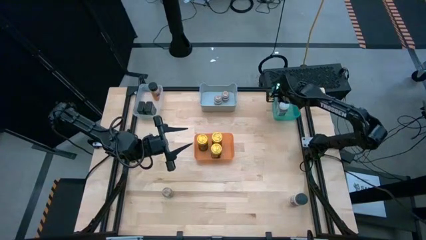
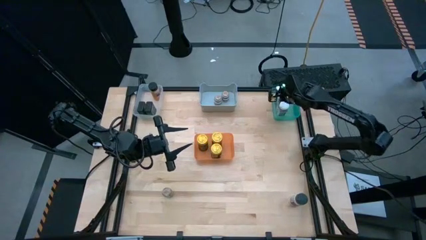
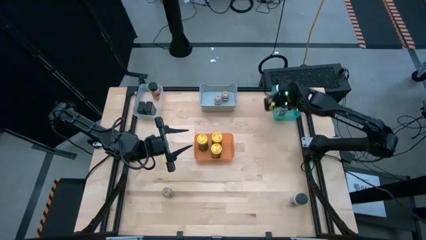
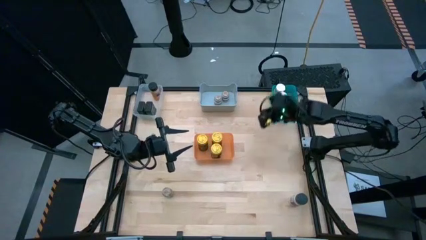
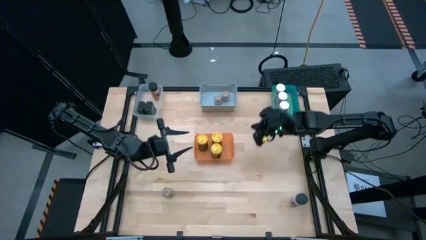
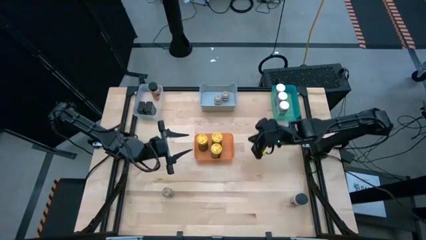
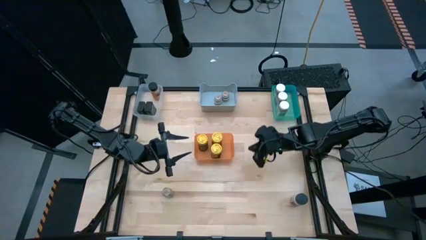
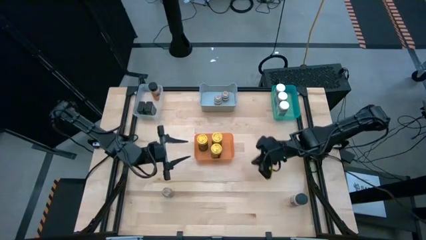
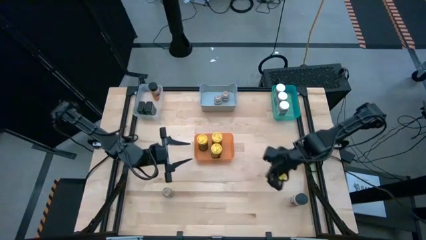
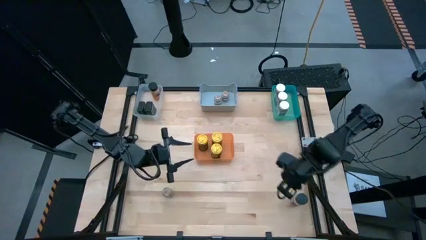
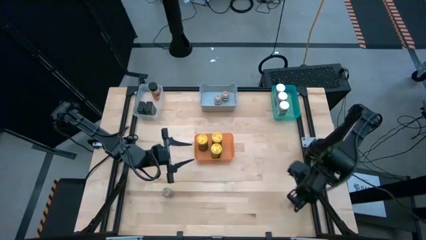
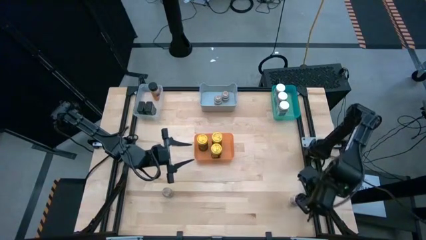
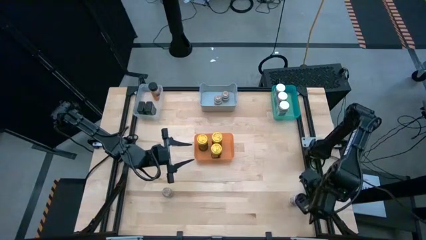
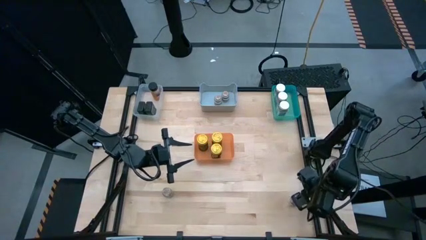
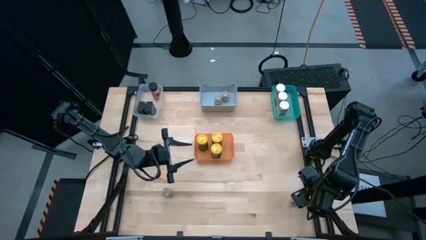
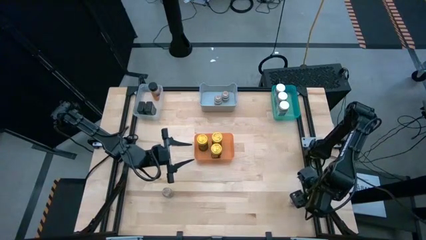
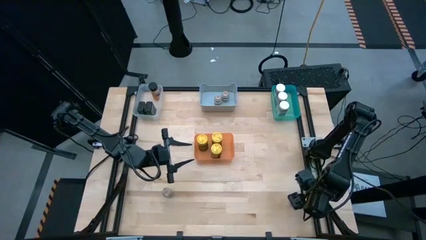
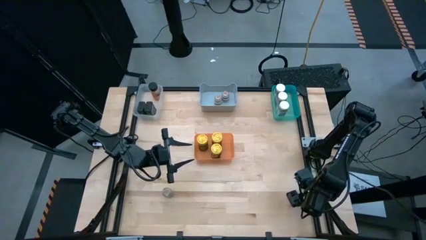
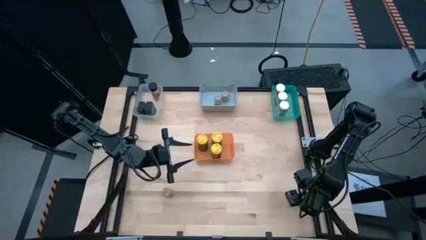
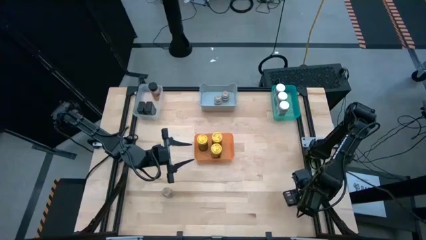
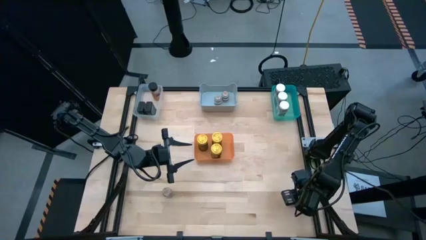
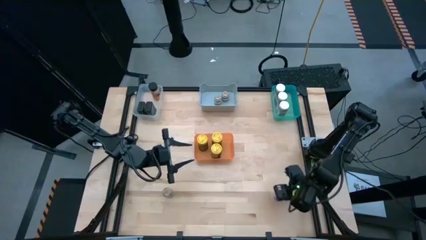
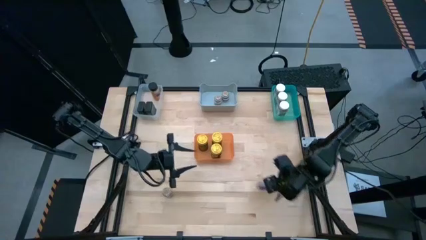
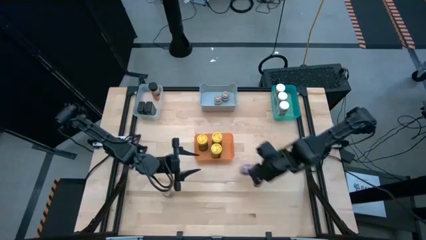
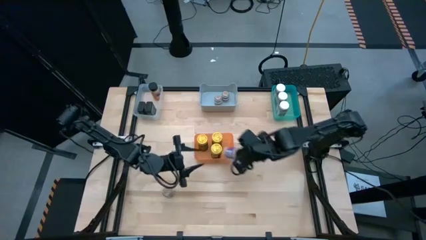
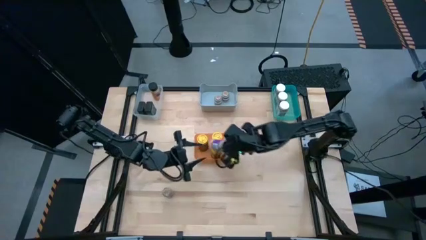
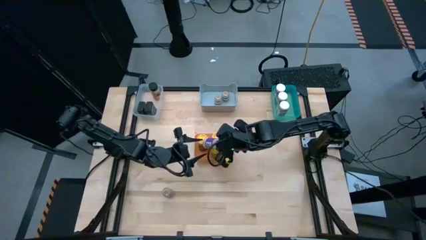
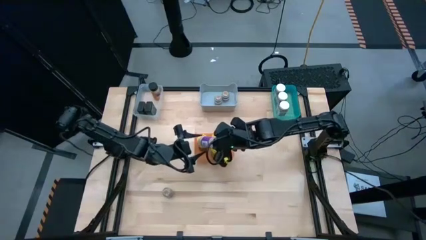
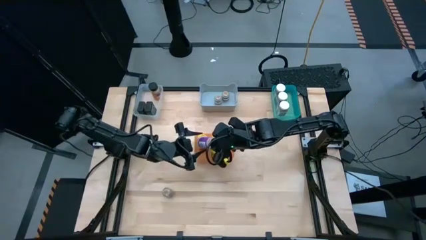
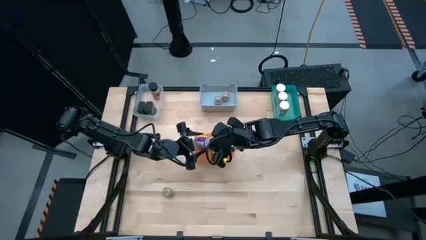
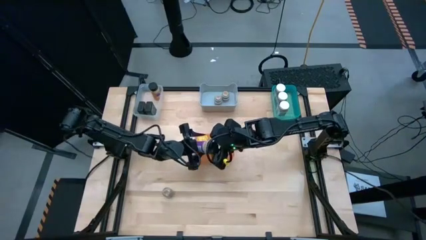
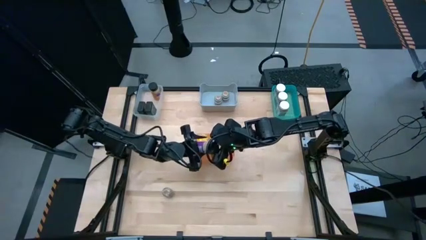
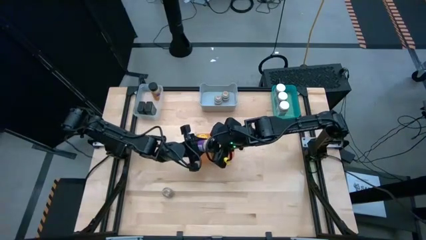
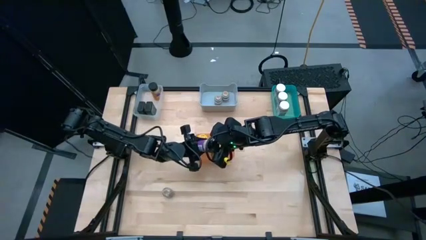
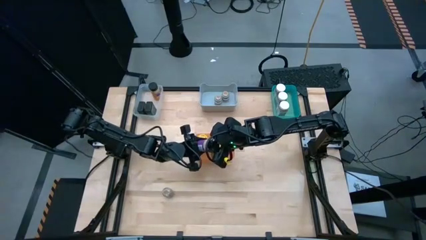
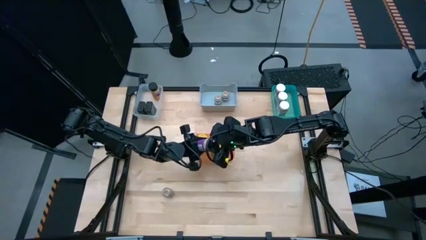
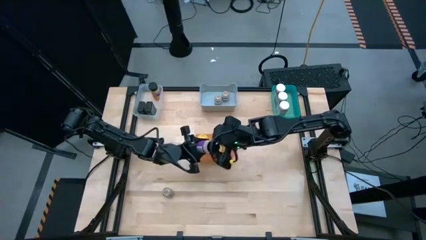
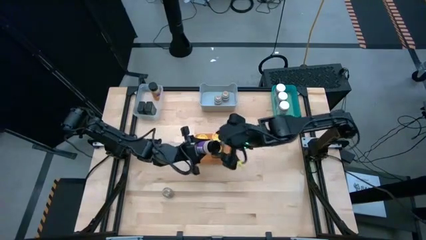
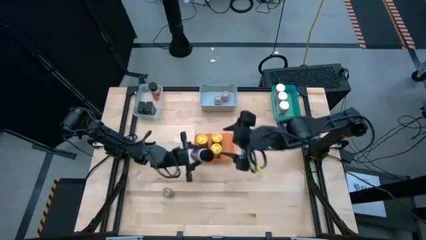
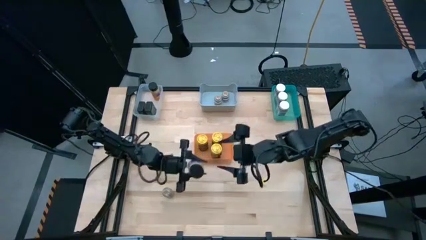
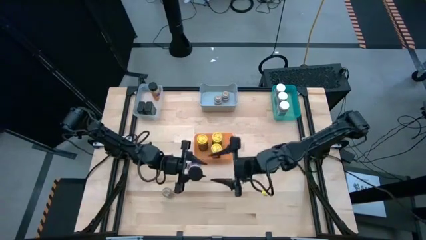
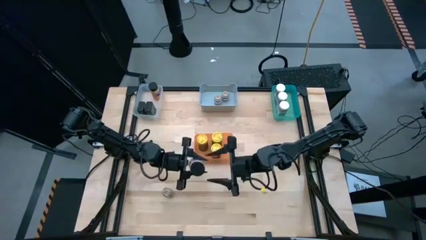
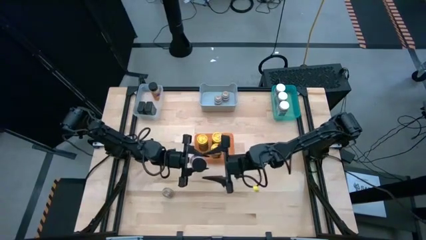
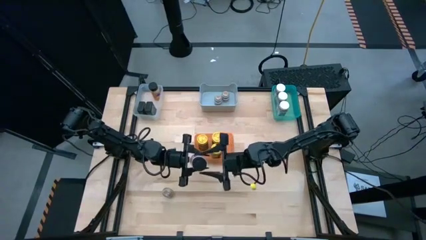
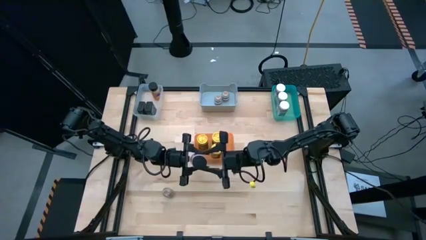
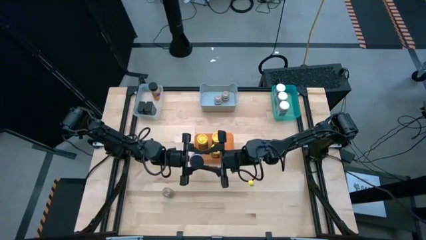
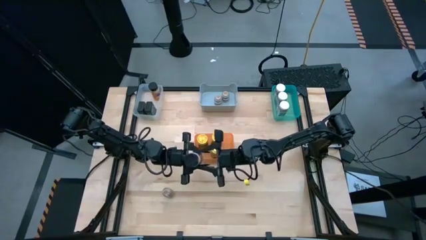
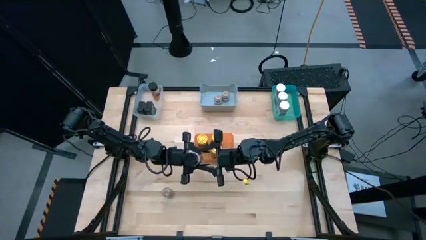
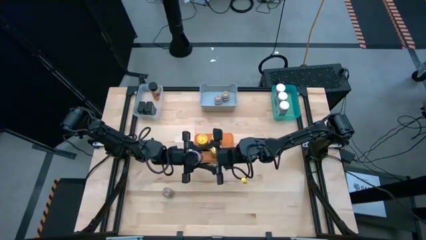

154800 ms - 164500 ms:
Task: Sort spices by type
Put the violet seasoning bottle into the transparent bin

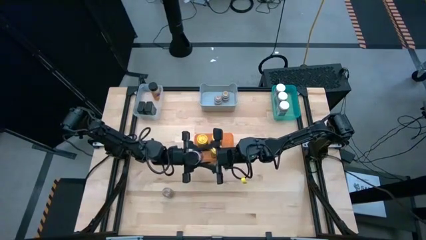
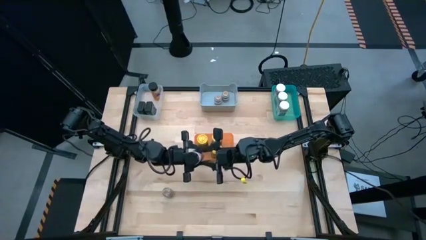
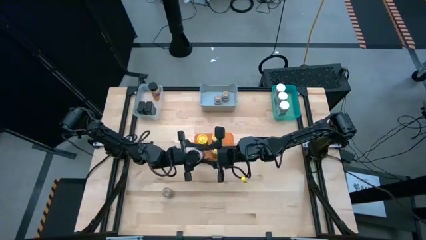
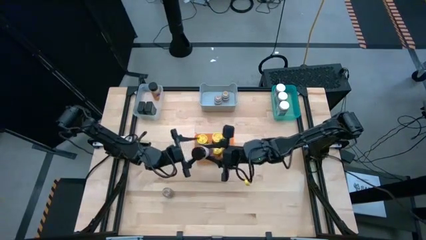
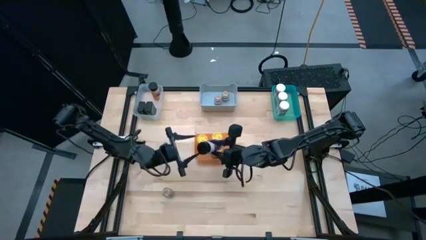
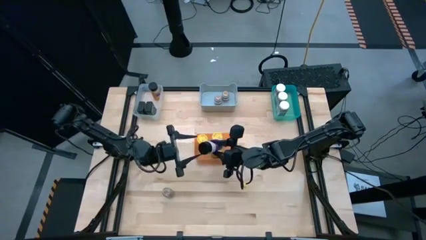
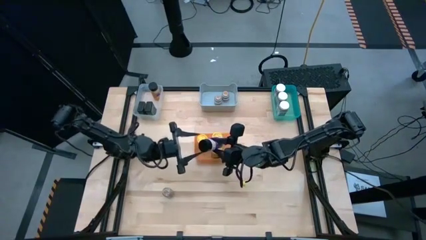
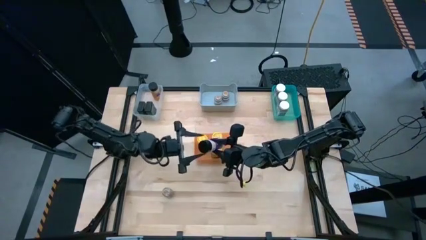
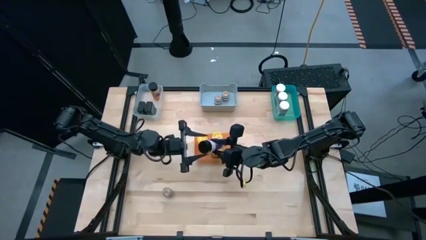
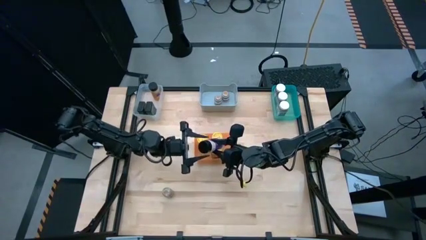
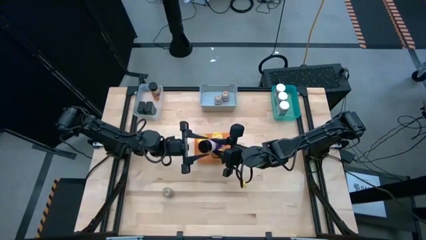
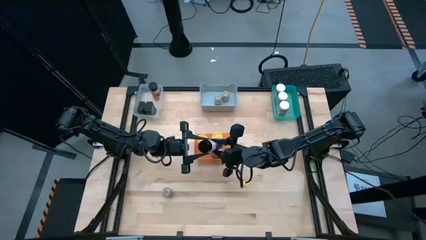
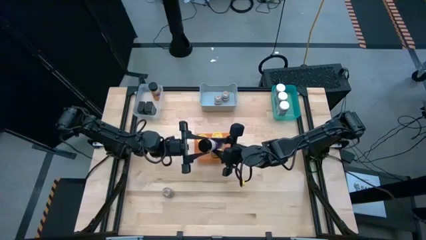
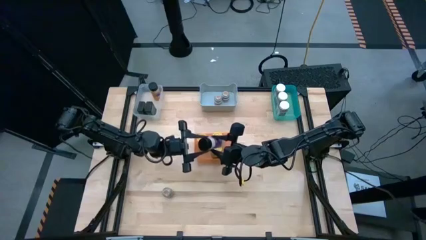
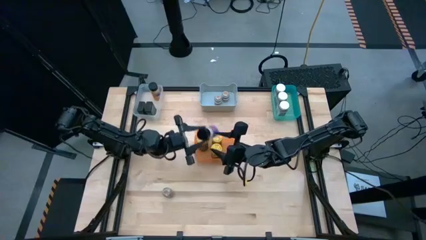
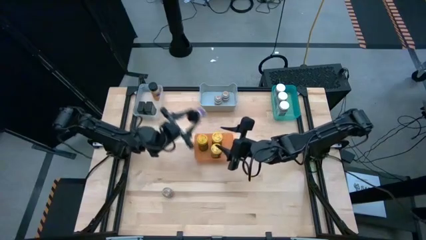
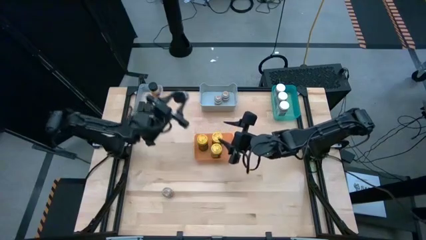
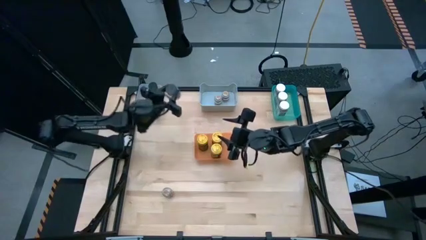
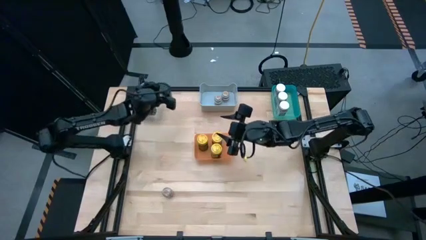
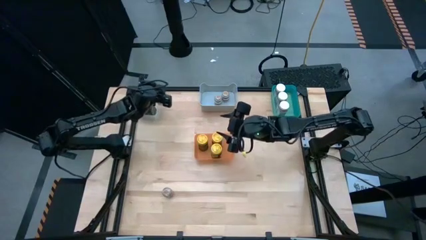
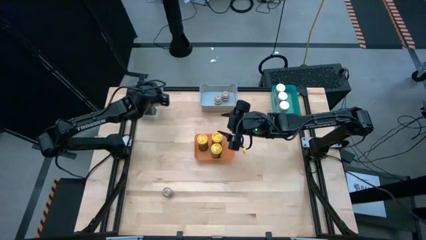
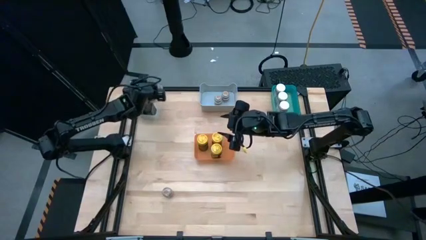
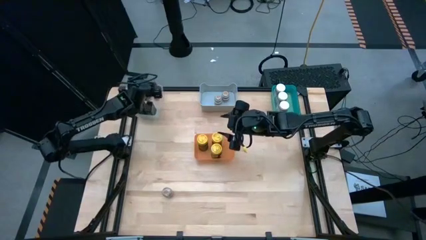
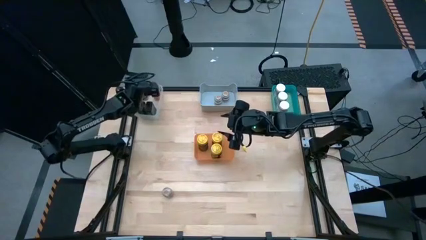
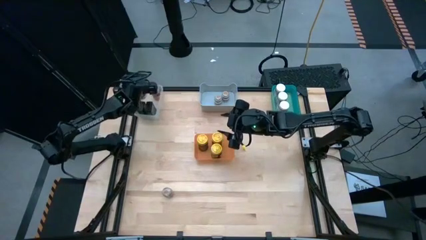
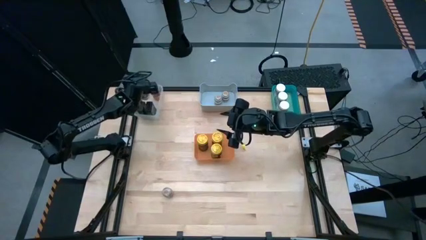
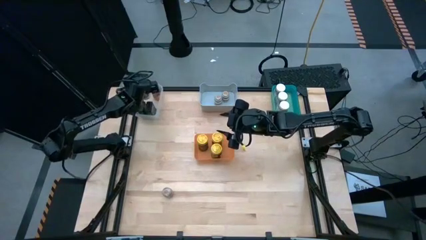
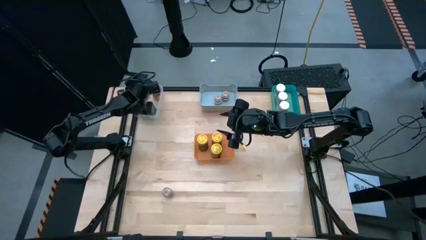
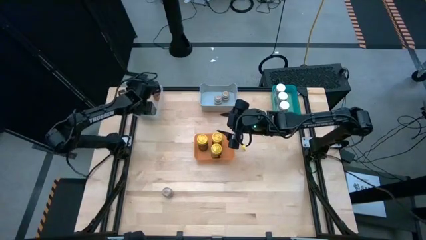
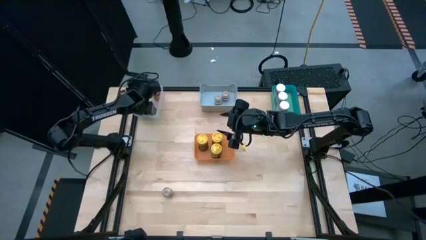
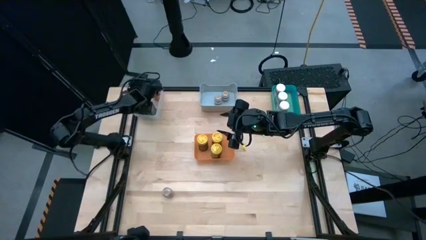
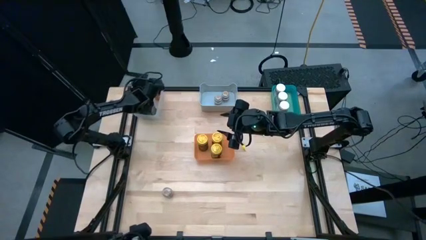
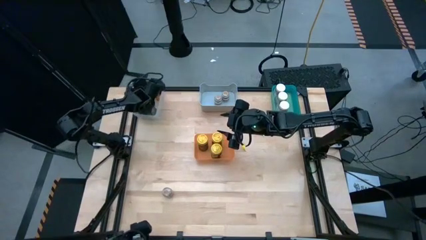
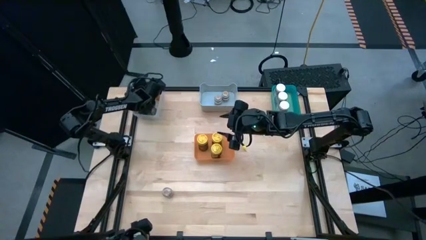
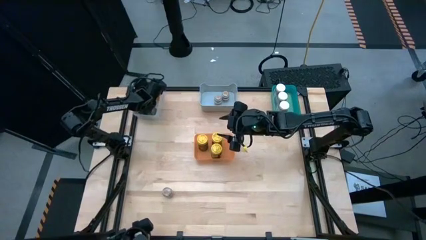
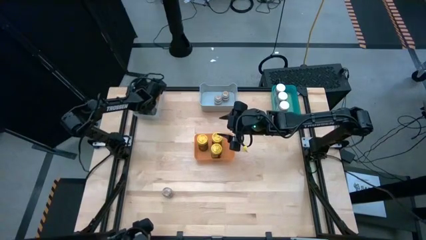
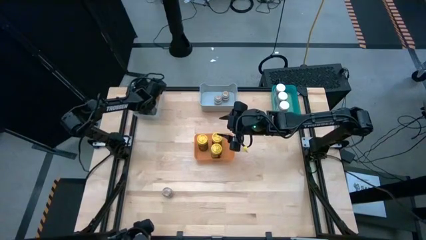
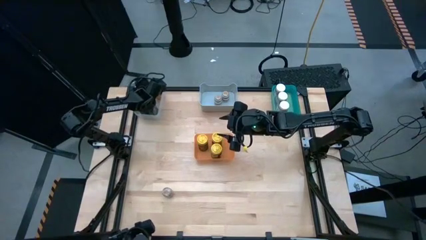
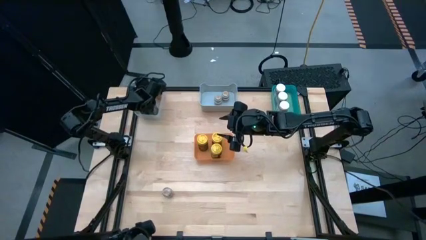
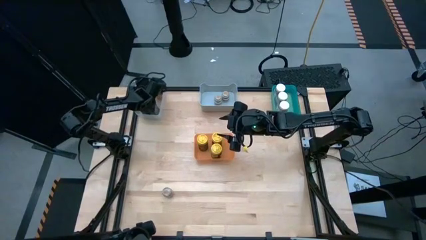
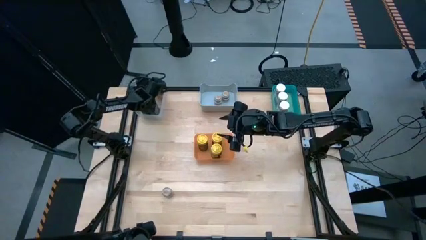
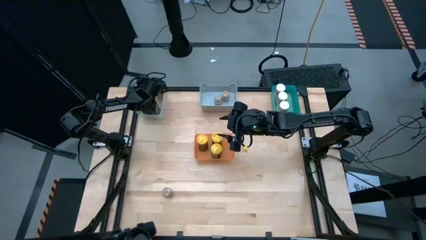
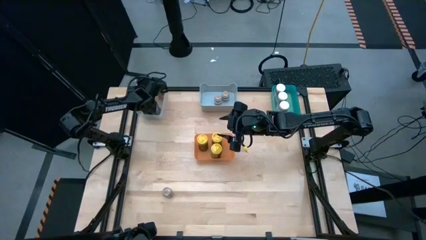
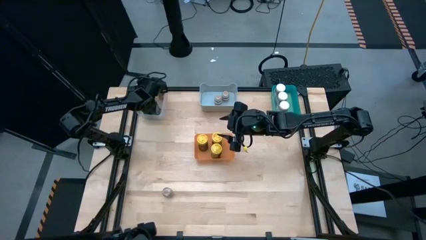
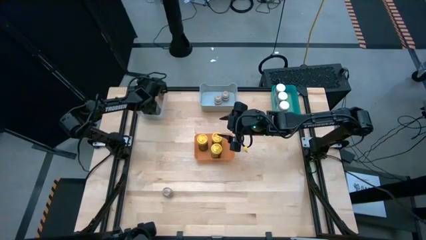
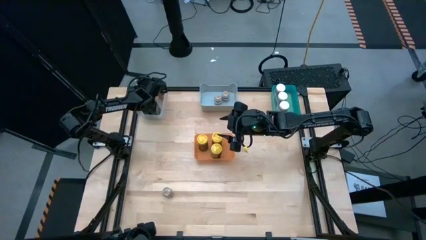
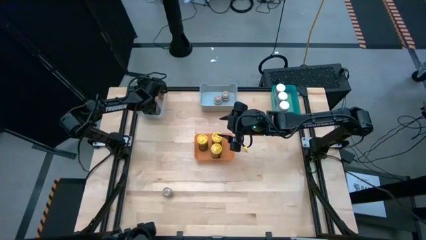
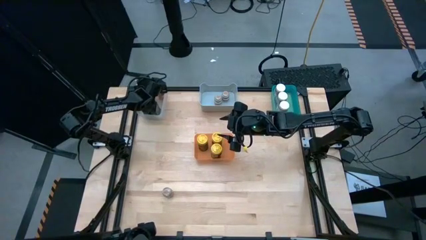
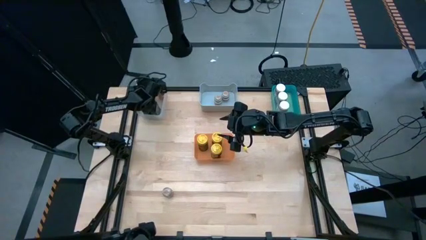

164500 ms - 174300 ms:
Put the violet seasoning bottle into the transparent bin
